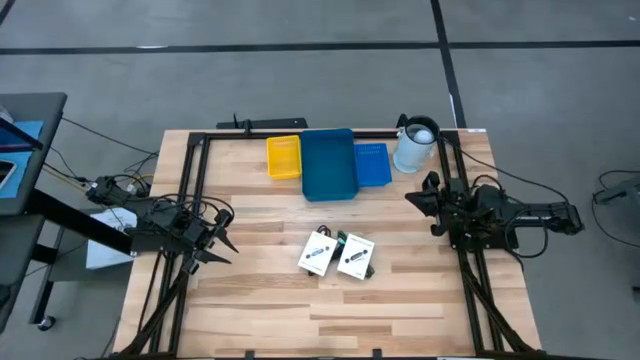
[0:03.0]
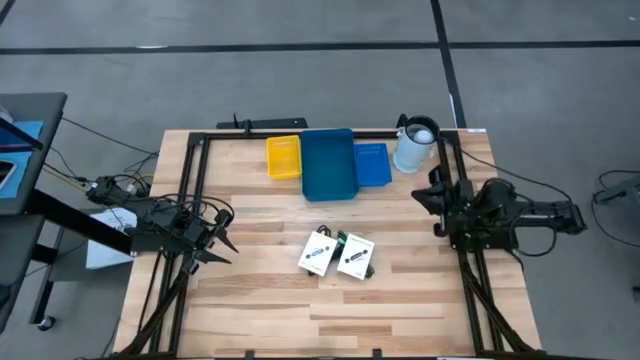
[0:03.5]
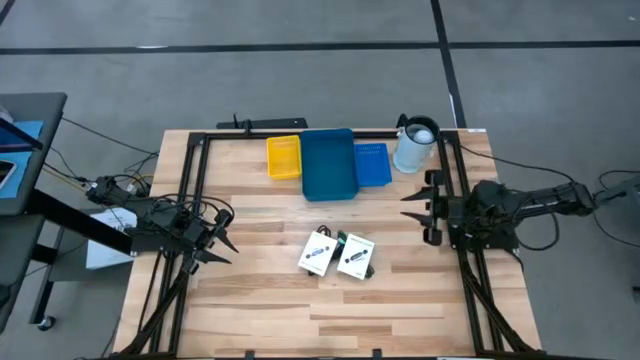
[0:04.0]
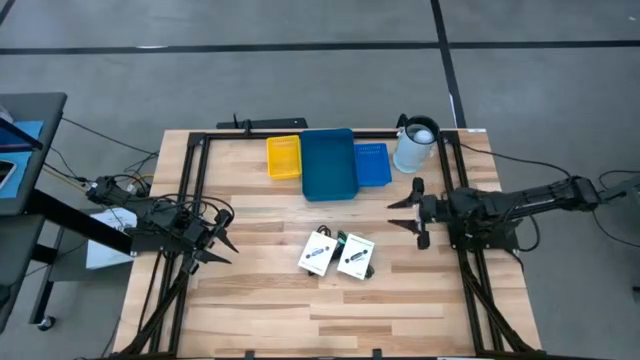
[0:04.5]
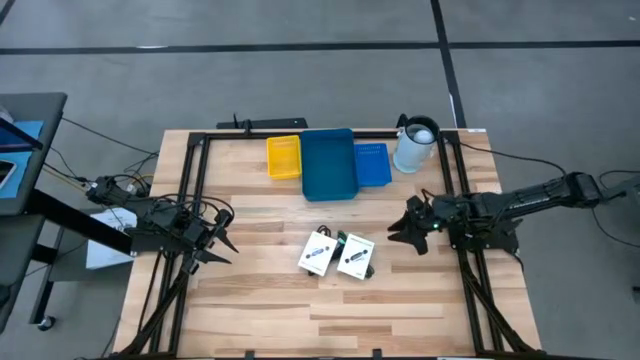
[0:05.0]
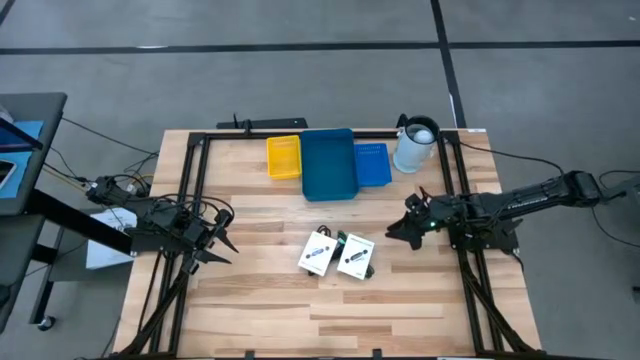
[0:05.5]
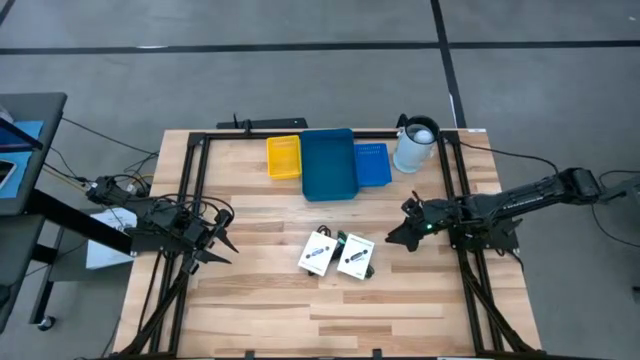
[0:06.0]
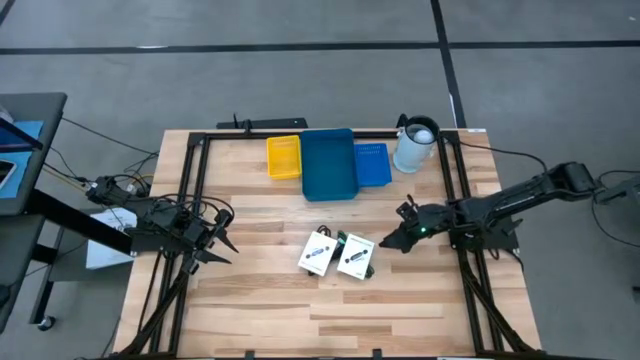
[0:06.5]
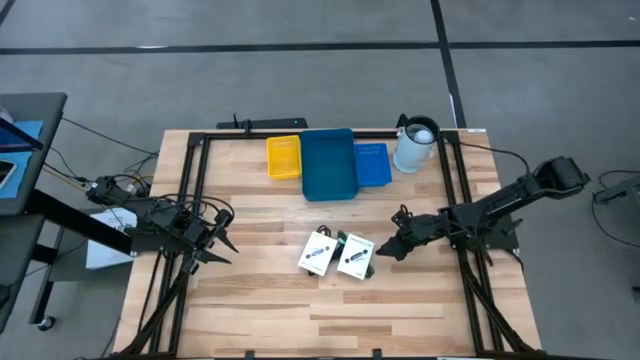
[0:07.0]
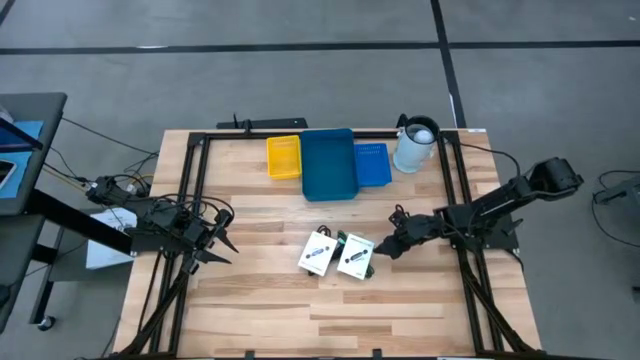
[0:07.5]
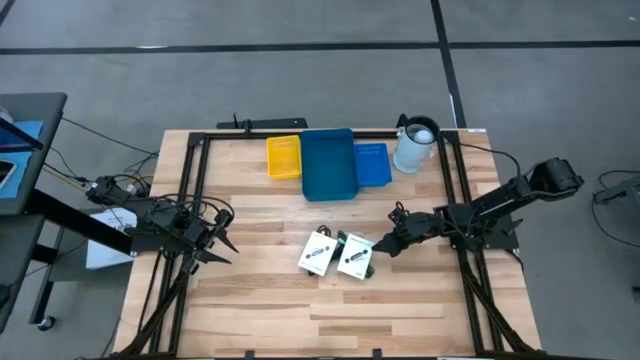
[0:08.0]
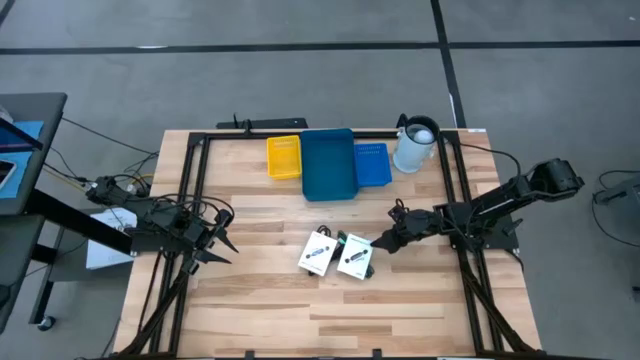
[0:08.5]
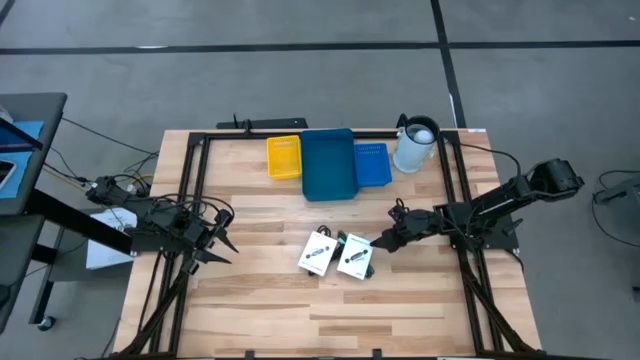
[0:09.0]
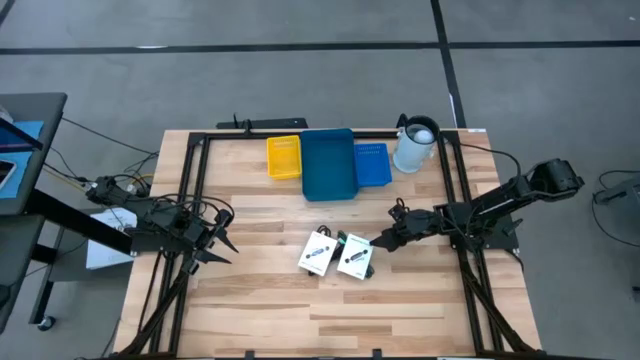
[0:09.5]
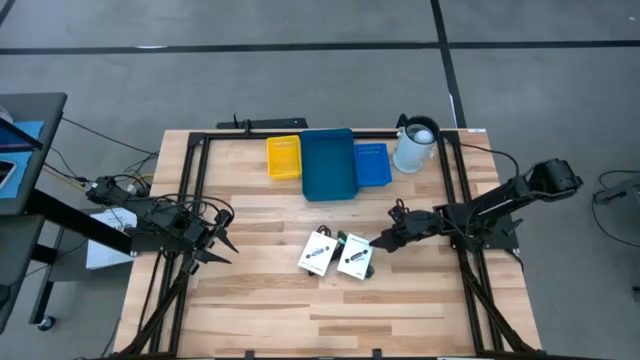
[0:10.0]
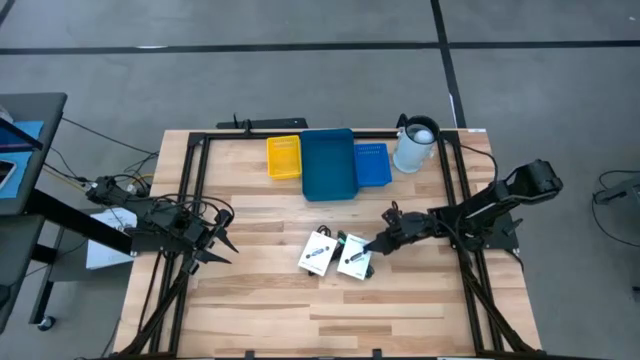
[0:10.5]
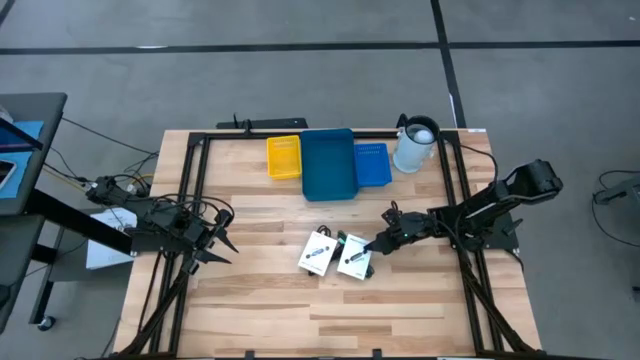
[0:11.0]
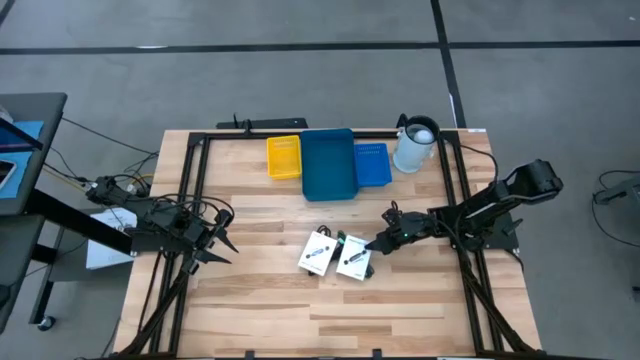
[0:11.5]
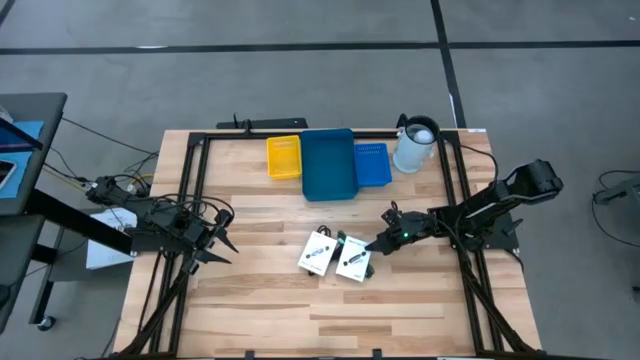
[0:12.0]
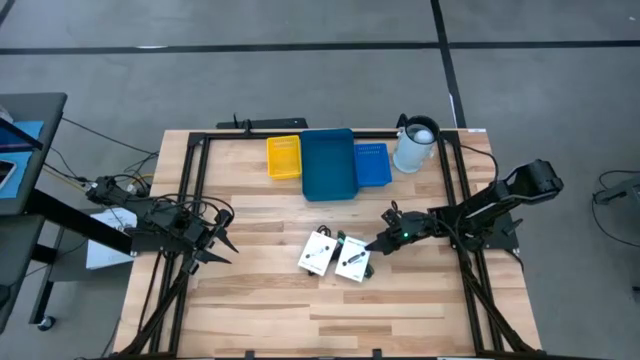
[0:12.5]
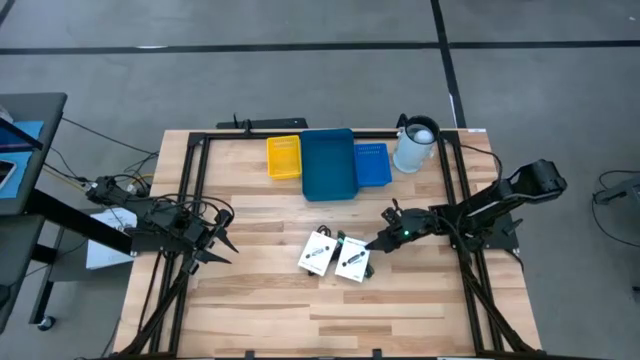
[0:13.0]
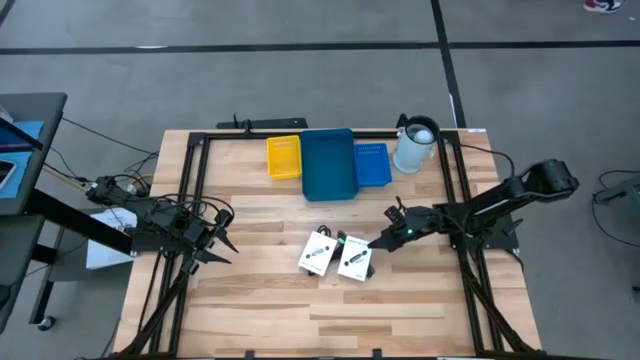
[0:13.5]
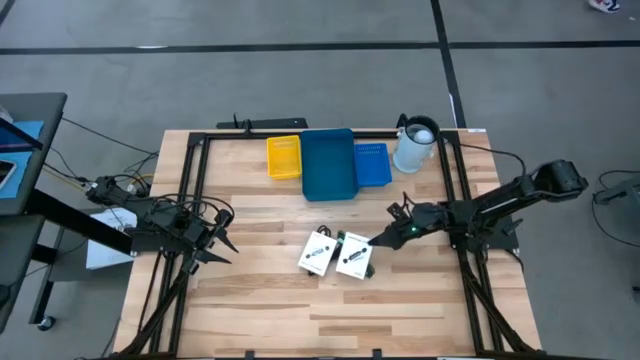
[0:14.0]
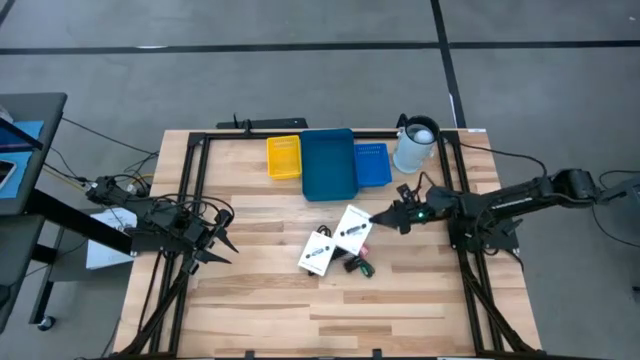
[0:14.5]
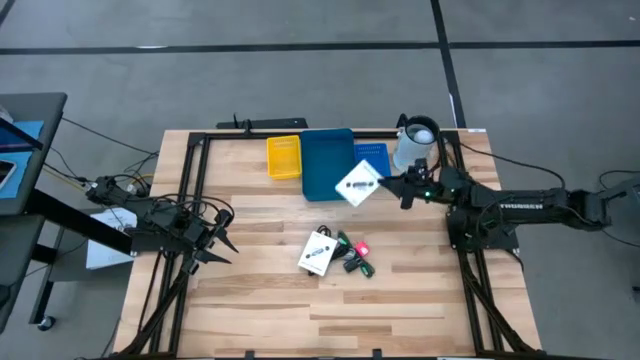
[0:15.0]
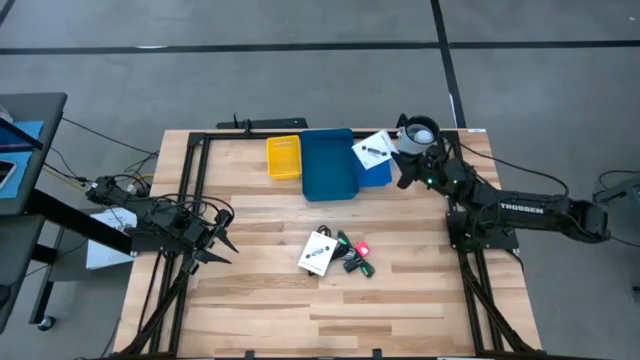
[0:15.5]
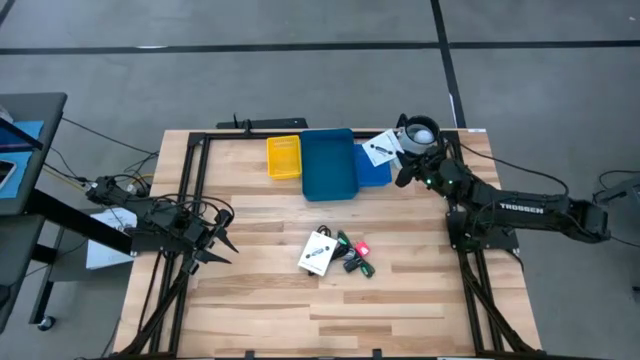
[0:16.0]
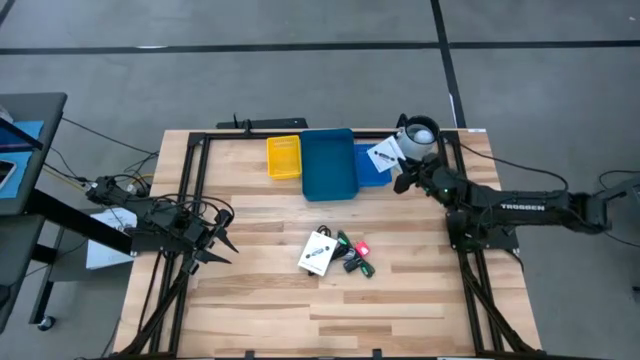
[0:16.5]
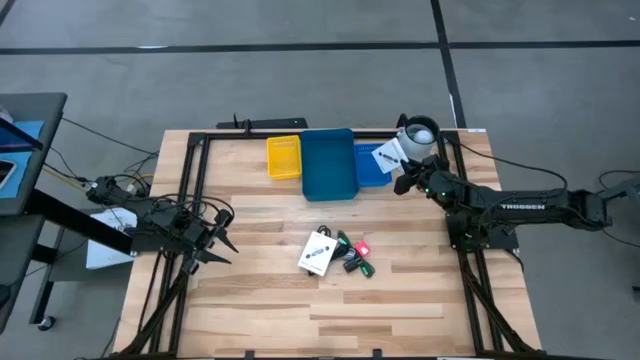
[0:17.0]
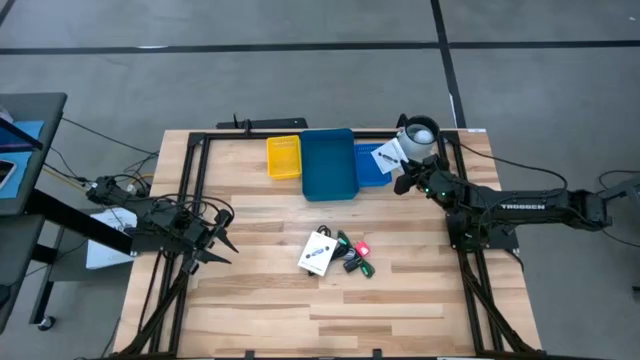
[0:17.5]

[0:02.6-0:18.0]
Task: Pick and place items into bin
Put the white card reader box into the blue basket

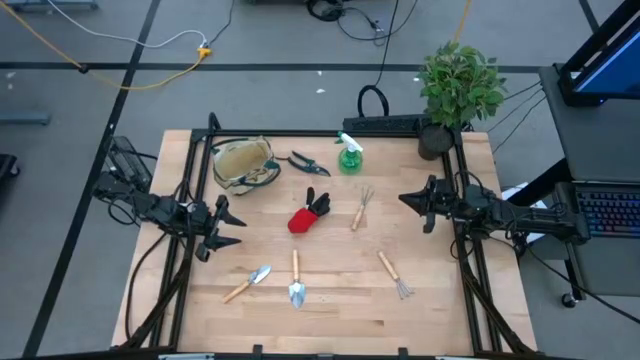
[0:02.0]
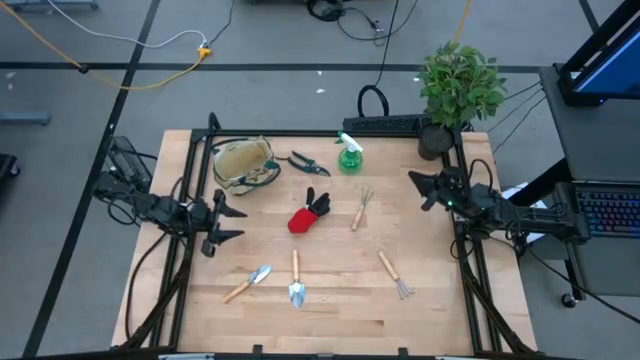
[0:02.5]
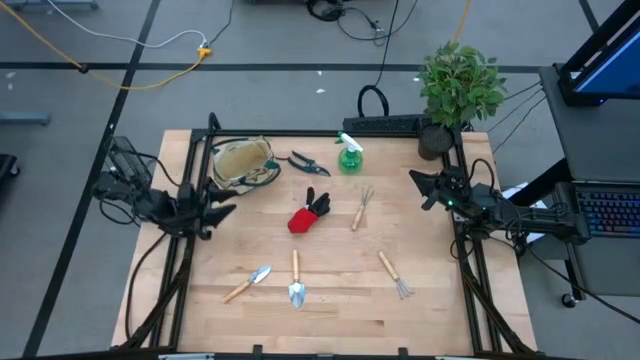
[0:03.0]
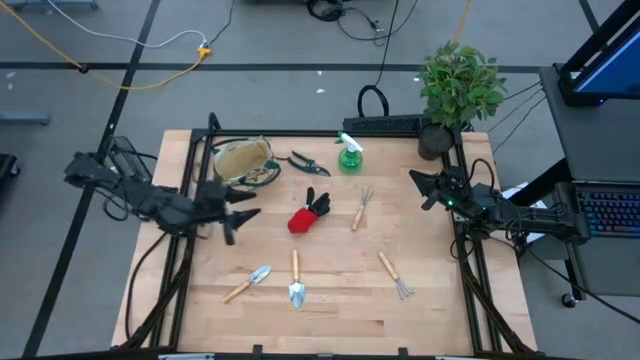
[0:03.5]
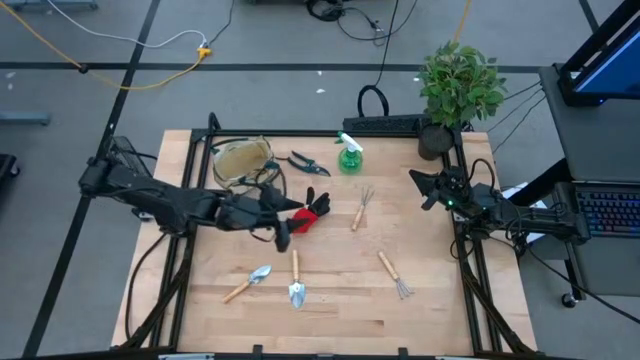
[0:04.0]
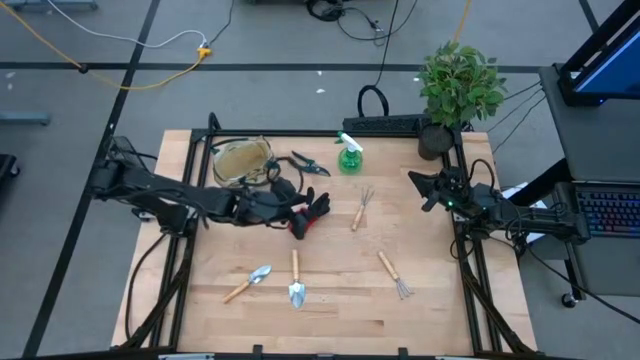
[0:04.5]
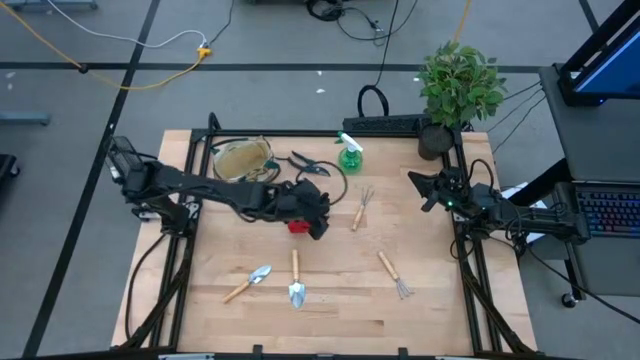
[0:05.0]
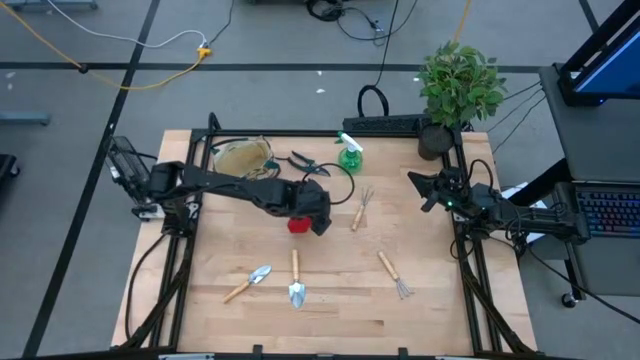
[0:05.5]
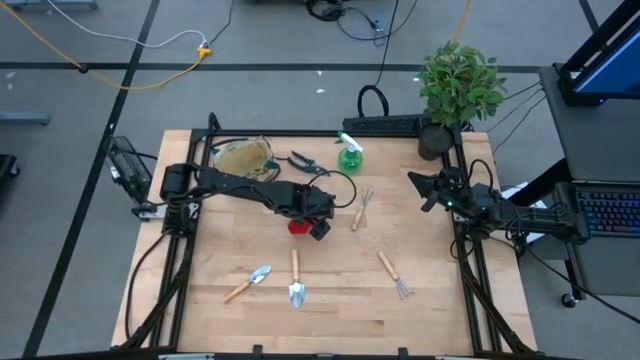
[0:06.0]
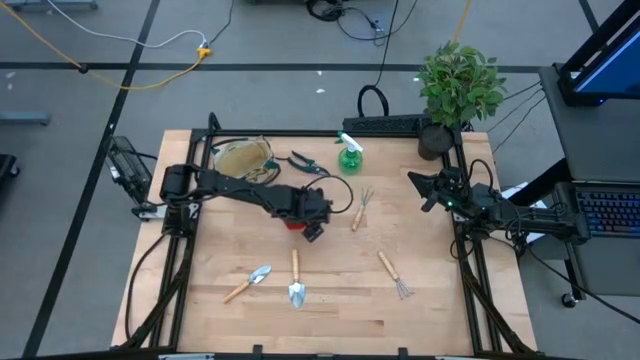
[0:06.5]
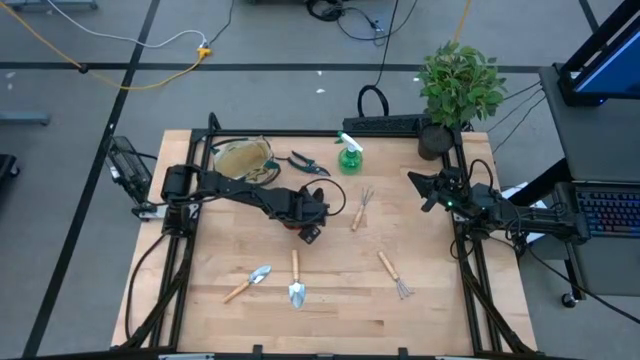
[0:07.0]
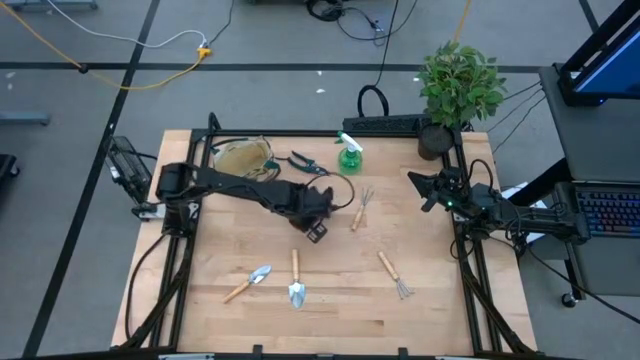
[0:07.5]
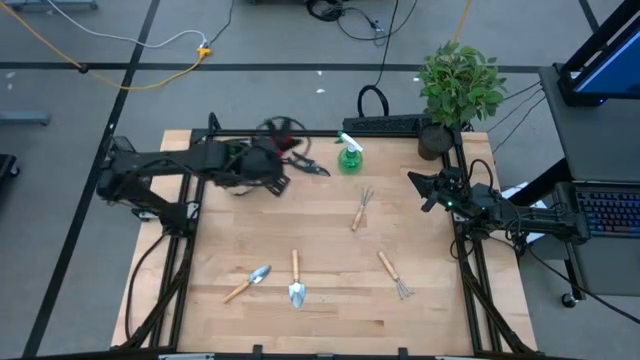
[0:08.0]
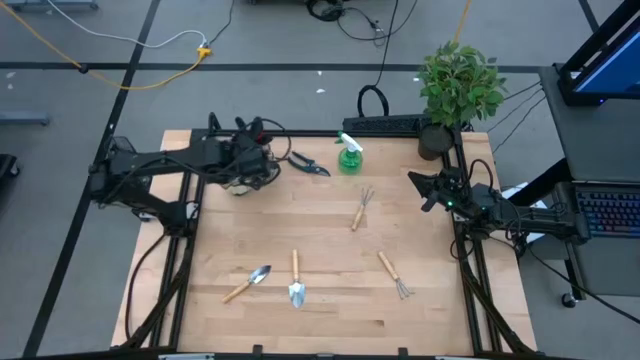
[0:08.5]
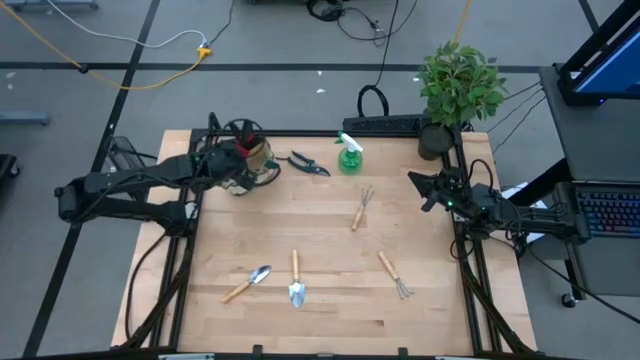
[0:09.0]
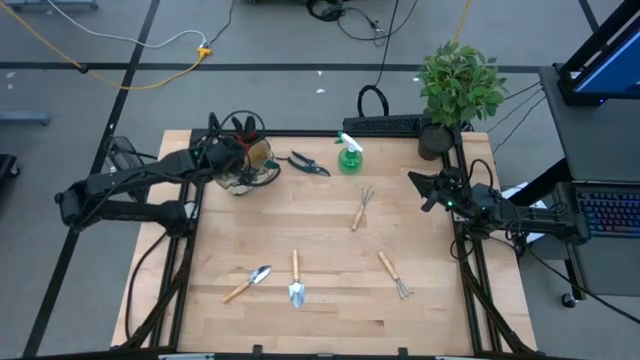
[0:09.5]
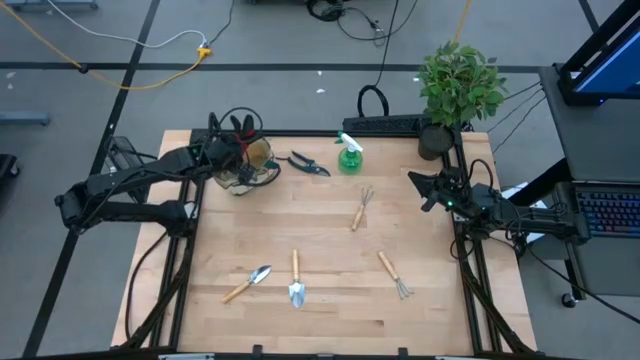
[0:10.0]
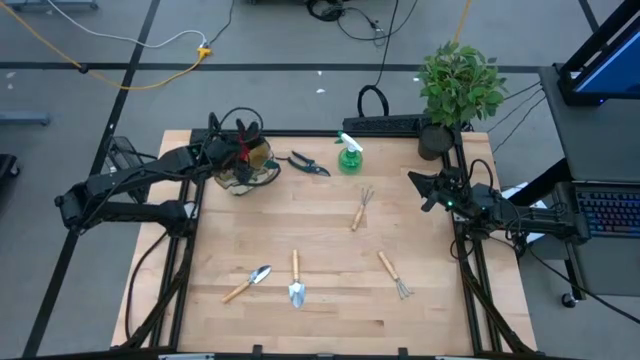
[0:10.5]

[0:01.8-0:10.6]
Task: Pick & Place Garden tools in Gardening bag
Put the gloves into the gardening bag
